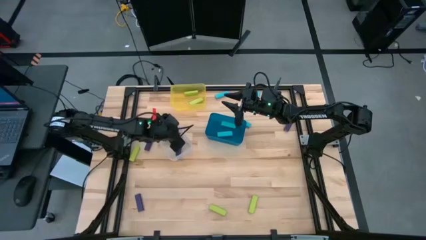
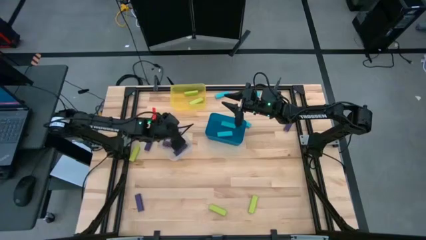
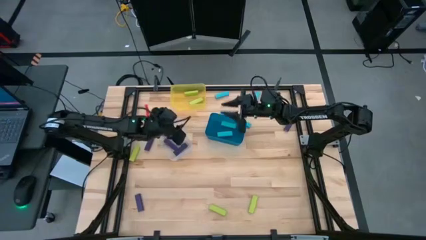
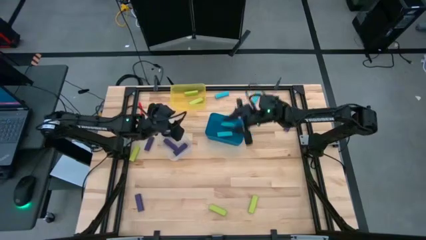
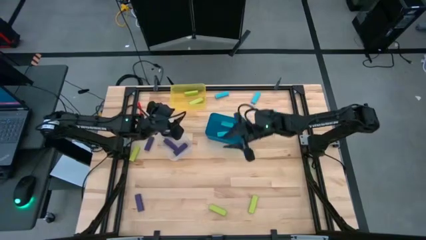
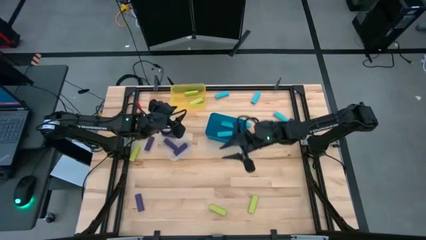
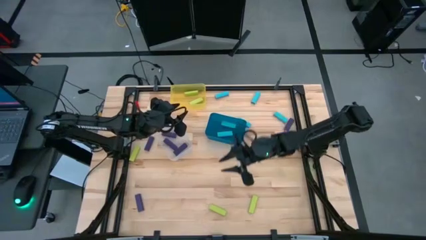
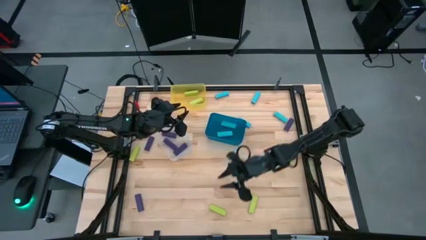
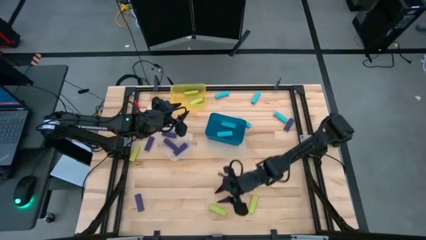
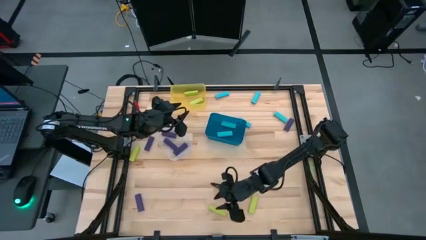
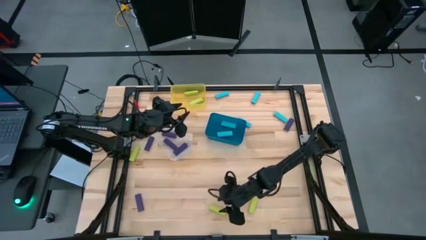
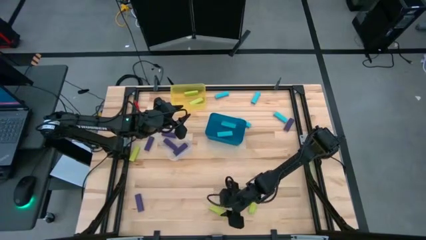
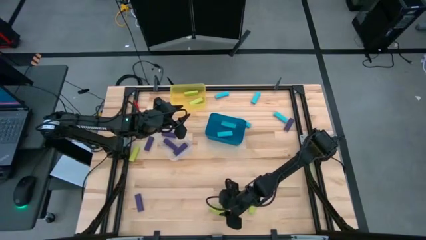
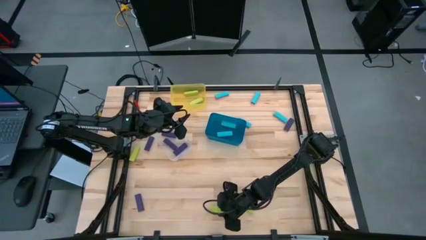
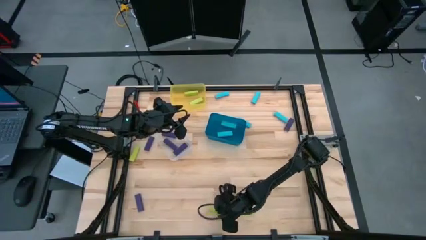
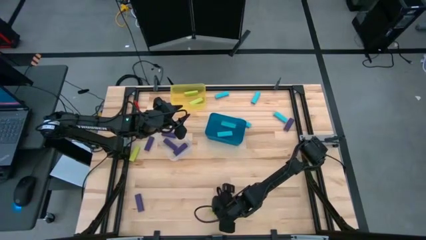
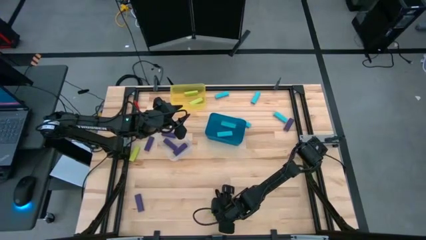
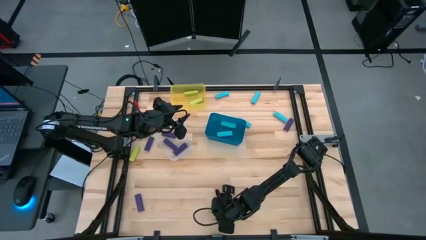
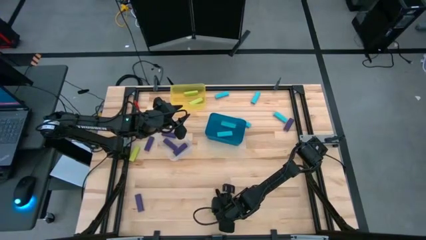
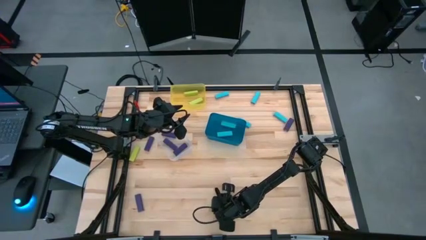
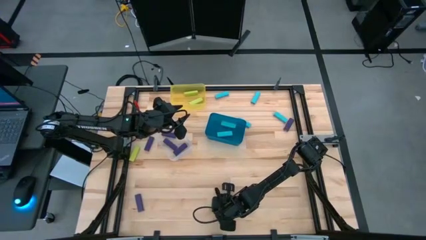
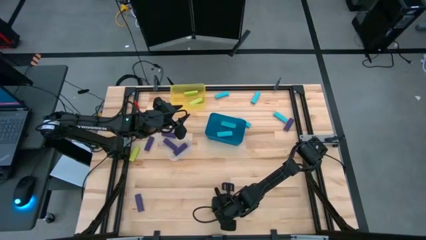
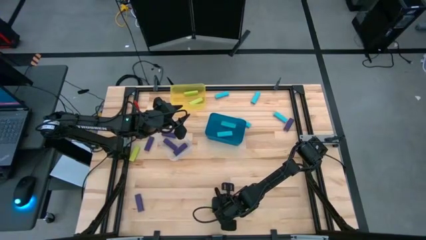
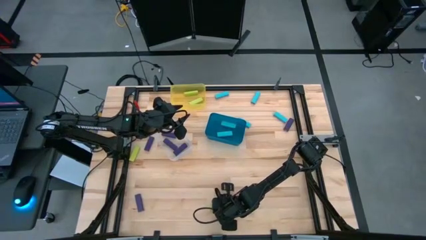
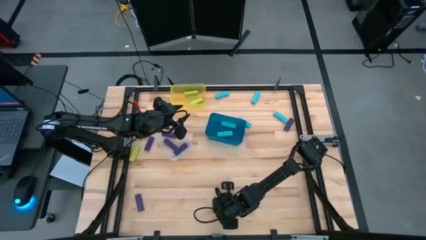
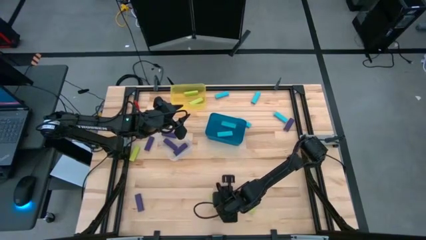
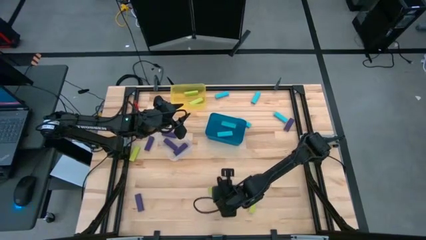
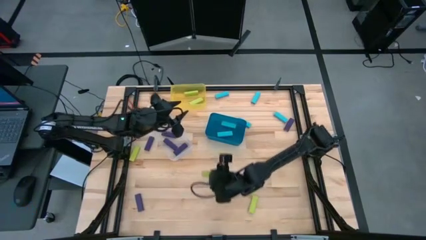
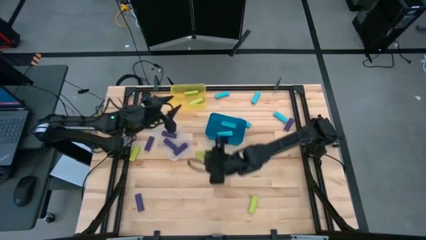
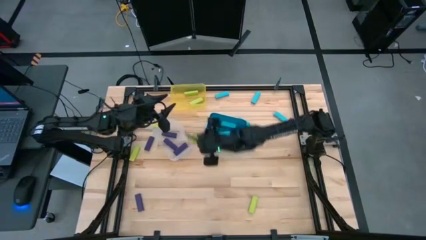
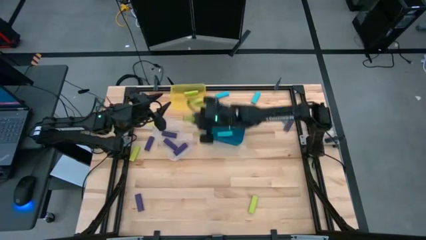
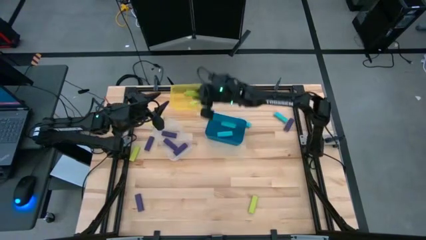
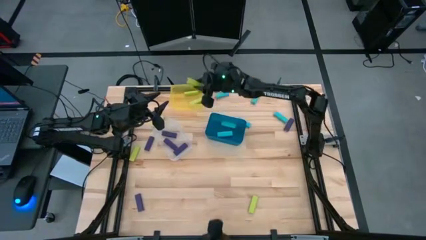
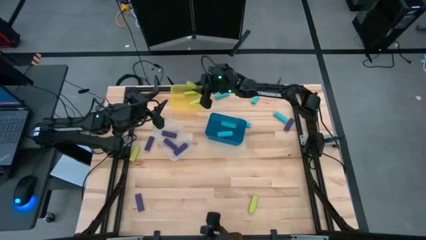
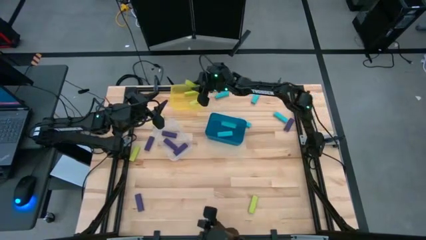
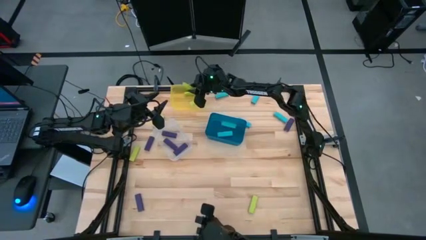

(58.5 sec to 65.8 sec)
Task: Sort blocks
Put the green block into the yellow bin

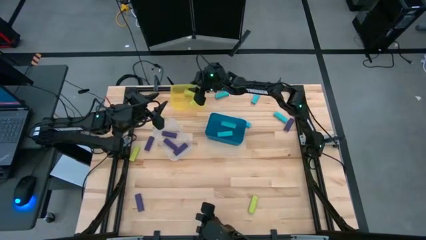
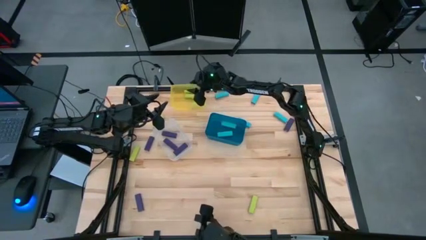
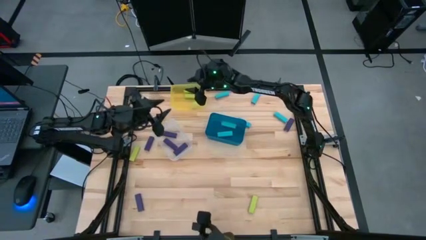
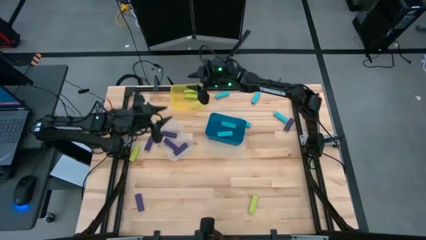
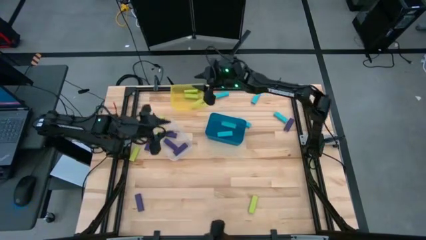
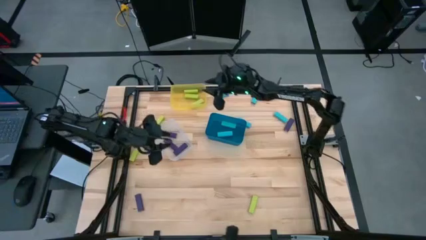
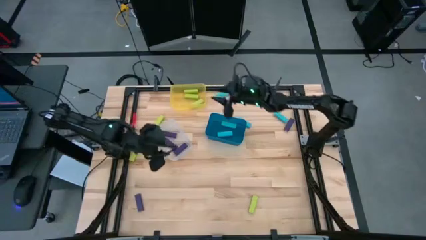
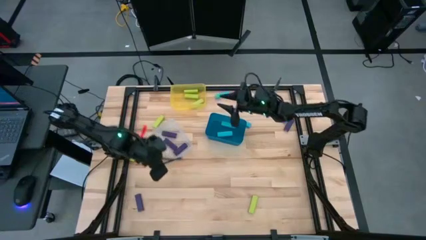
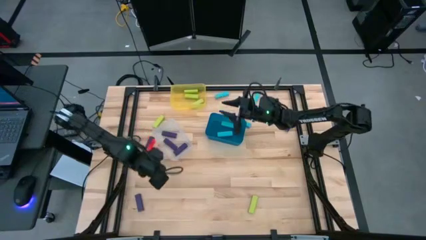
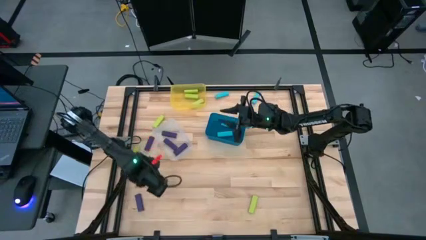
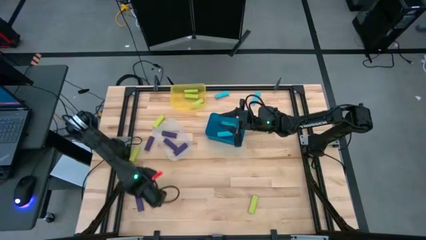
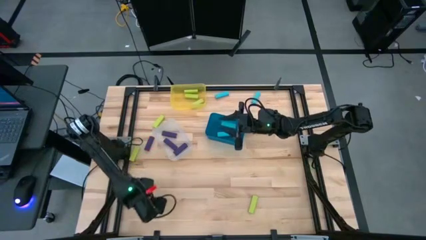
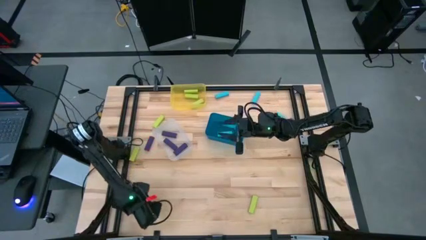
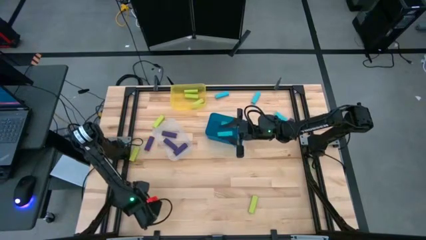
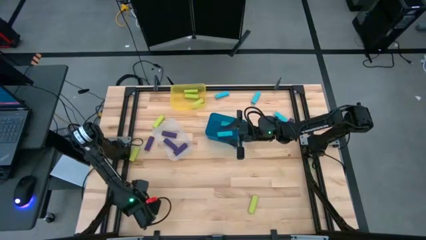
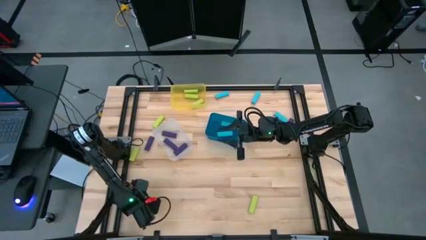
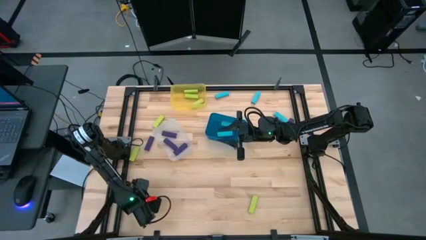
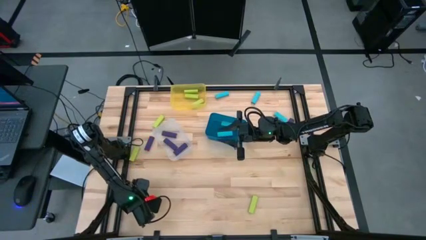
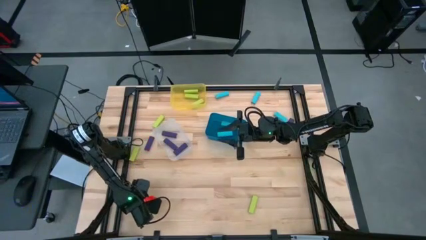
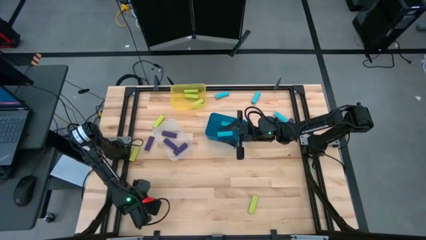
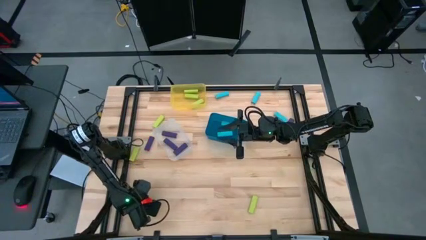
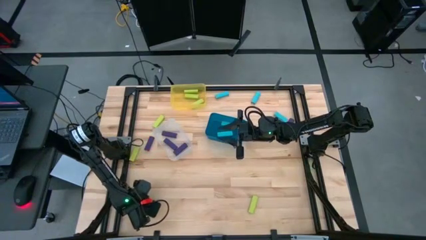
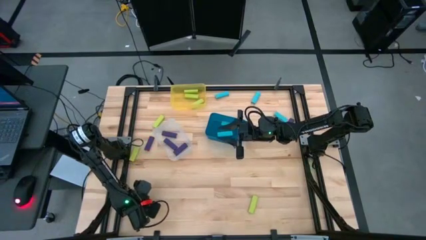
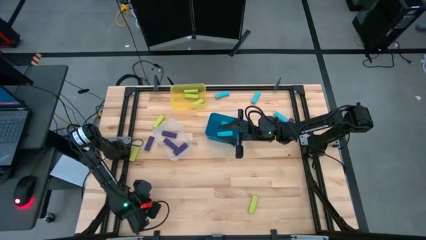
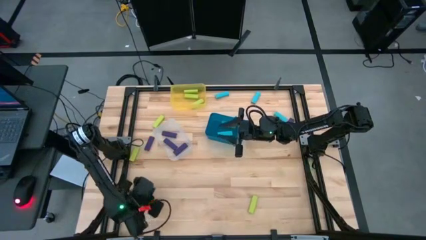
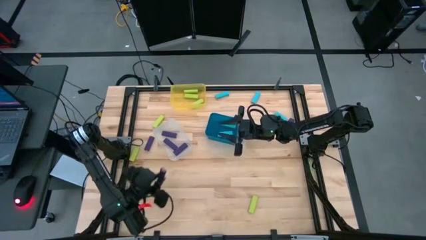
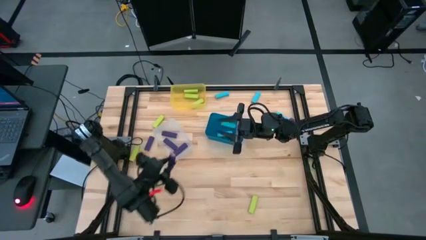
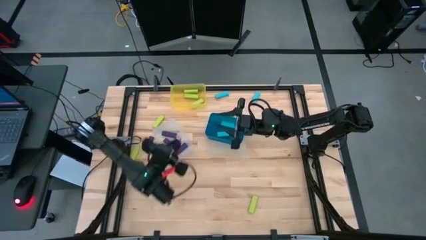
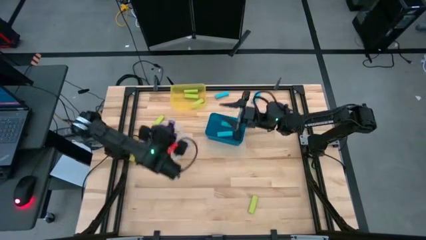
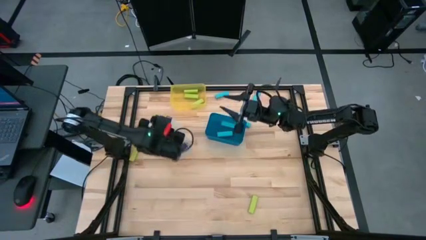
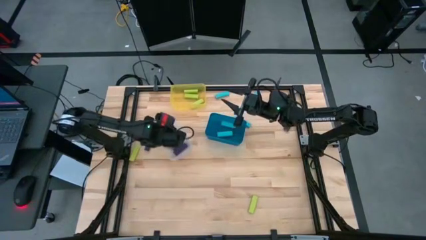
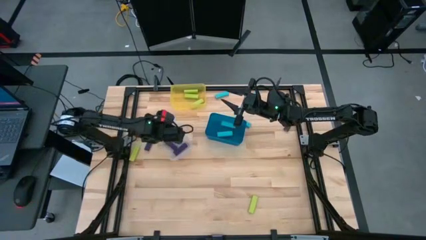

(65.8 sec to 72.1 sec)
Put the violet block into the transparent bin

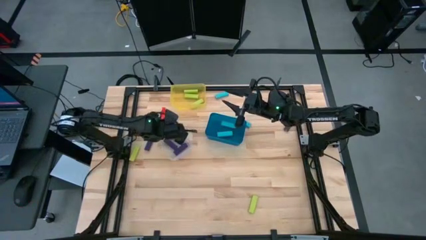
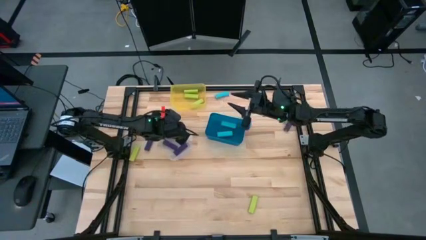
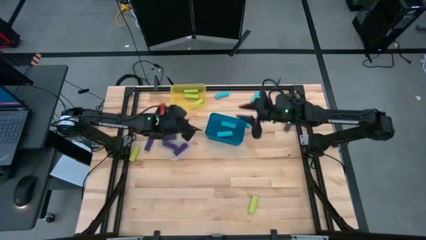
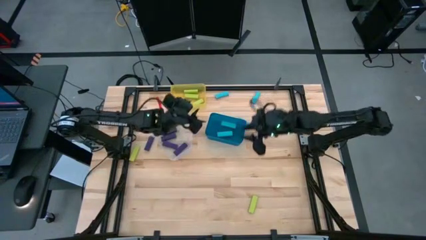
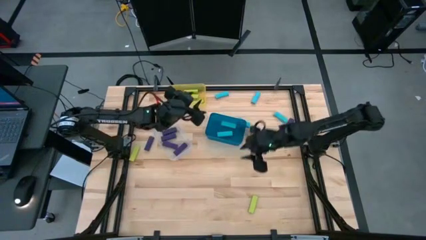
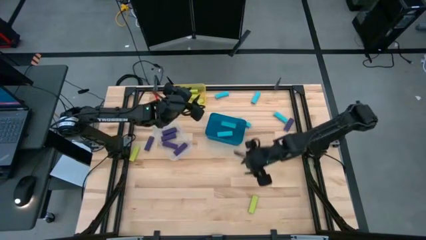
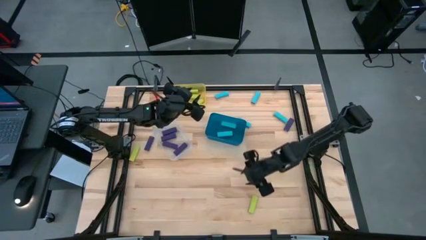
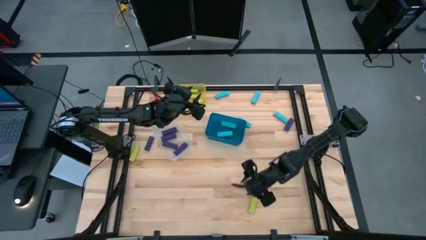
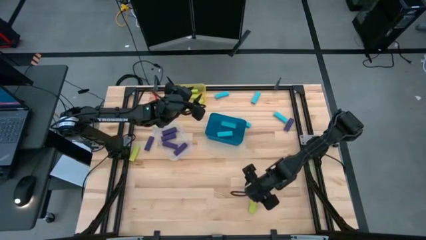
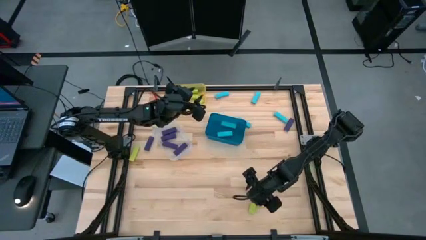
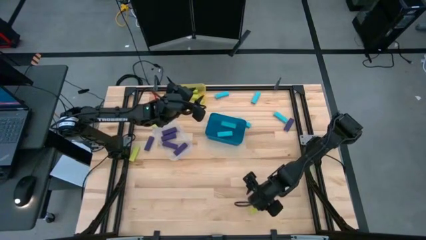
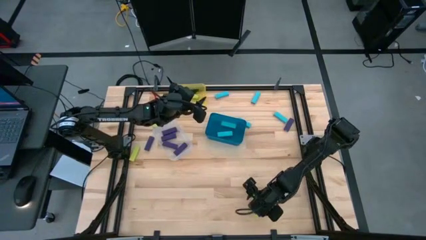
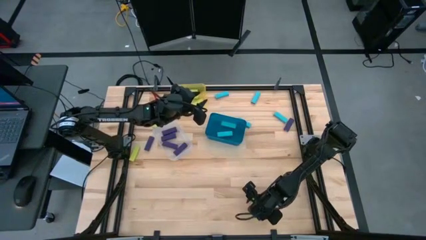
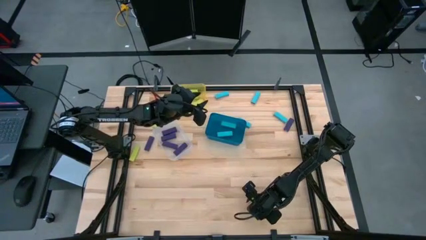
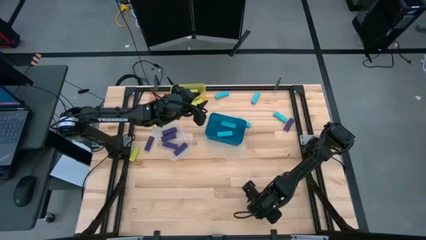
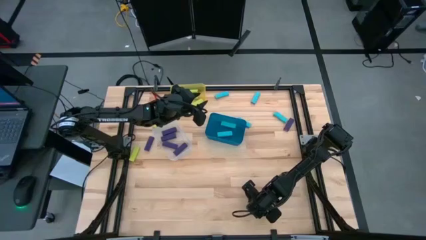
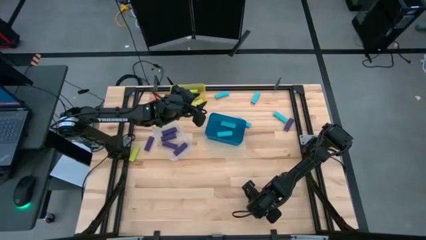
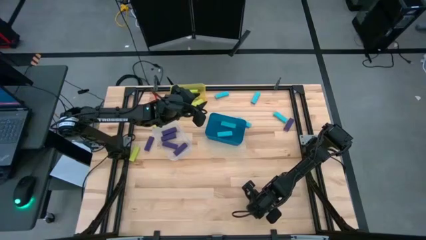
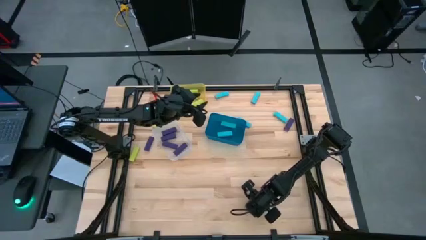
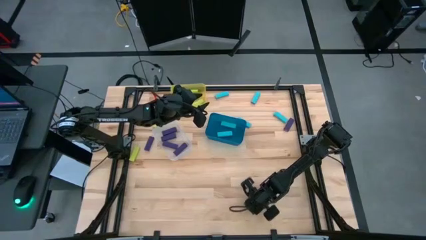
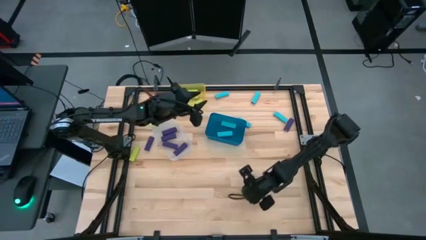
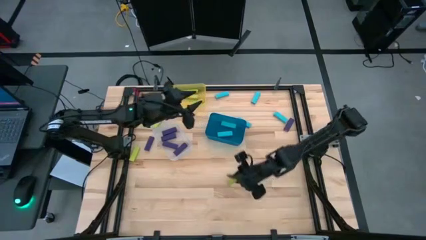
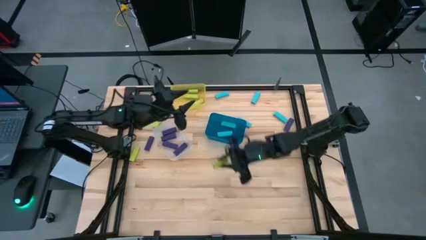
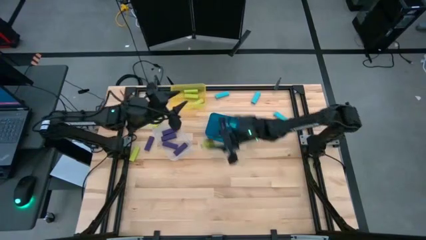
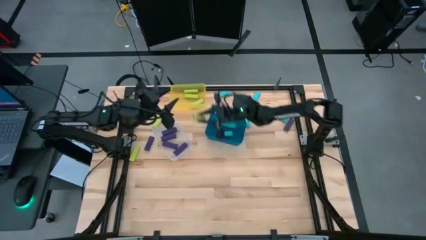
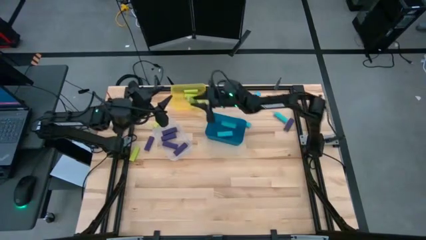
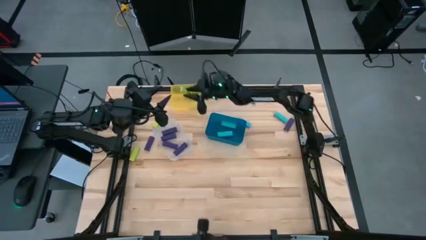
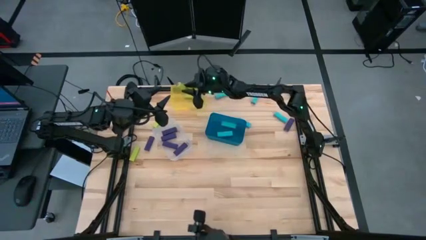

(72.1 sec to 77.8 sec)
Put the green block into the yellow bin
